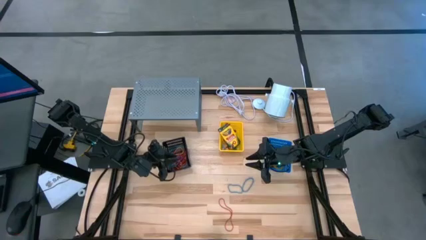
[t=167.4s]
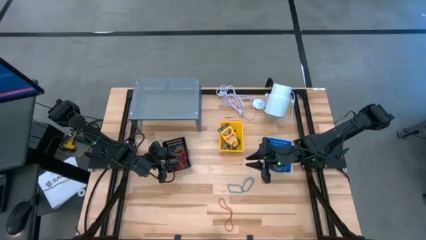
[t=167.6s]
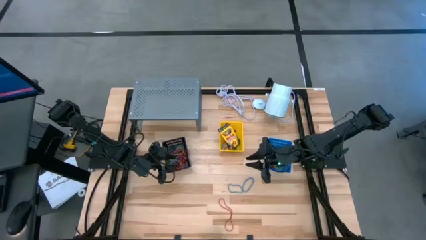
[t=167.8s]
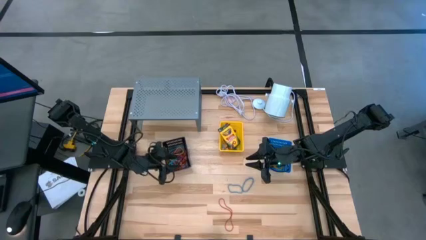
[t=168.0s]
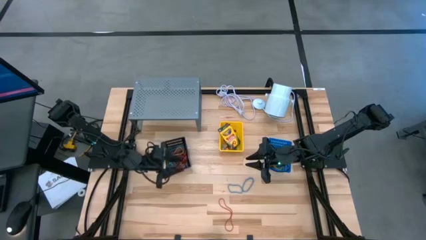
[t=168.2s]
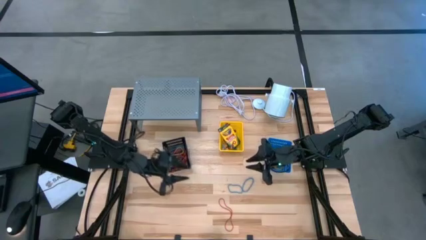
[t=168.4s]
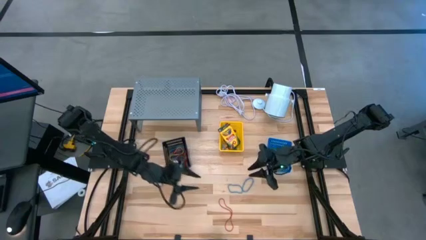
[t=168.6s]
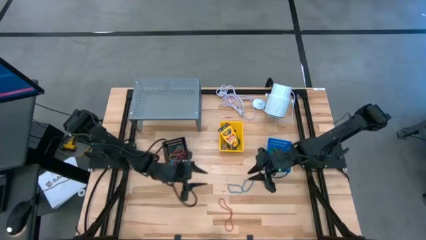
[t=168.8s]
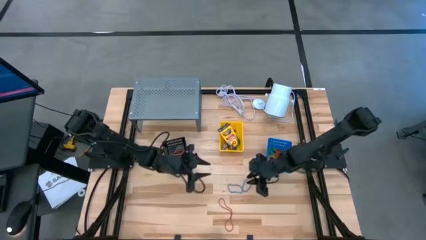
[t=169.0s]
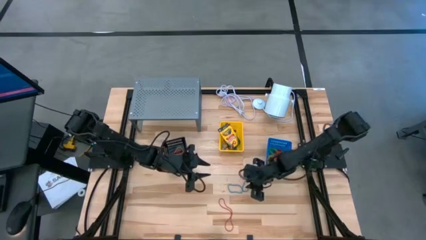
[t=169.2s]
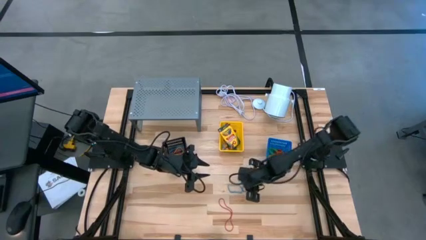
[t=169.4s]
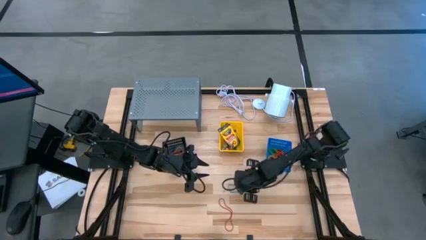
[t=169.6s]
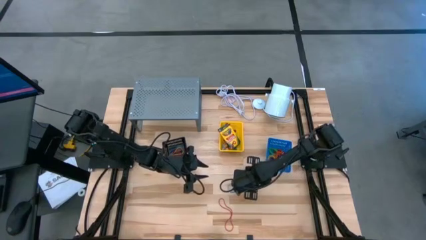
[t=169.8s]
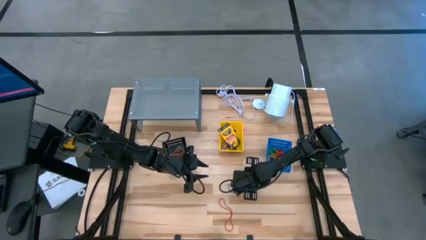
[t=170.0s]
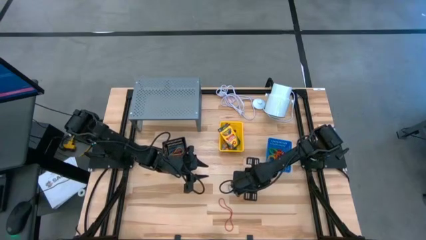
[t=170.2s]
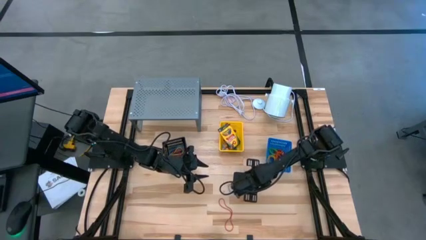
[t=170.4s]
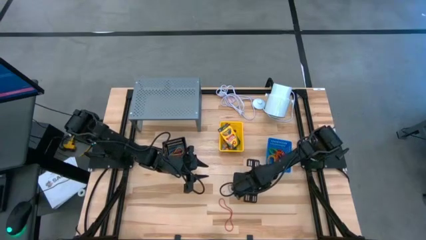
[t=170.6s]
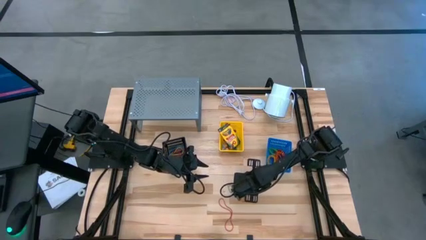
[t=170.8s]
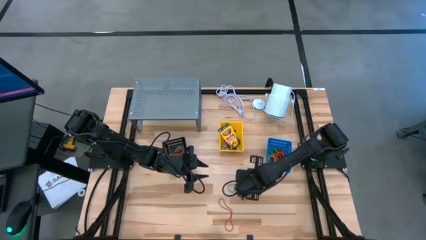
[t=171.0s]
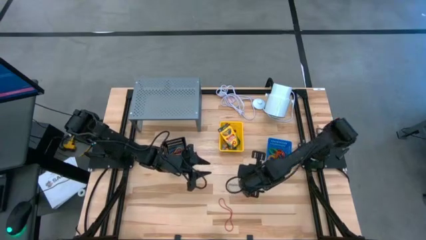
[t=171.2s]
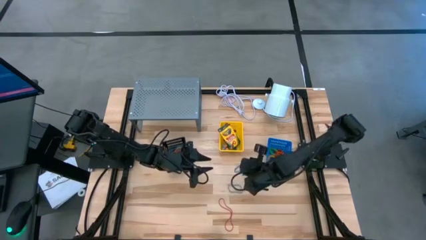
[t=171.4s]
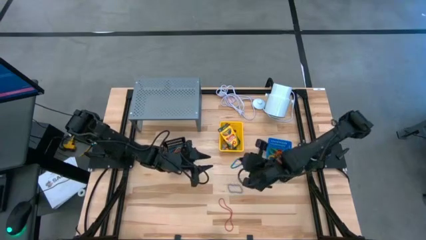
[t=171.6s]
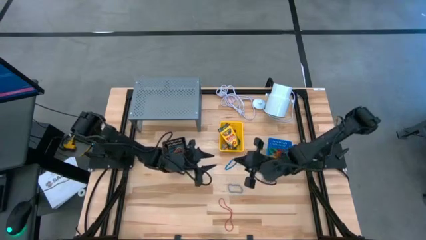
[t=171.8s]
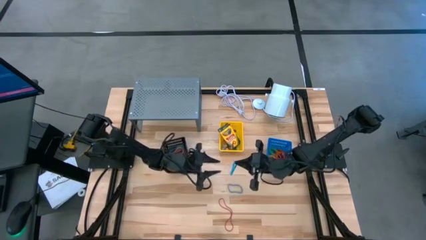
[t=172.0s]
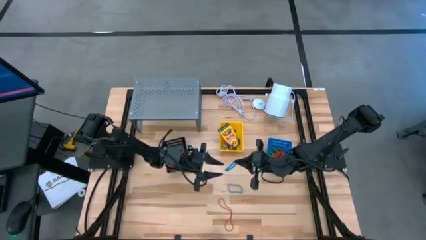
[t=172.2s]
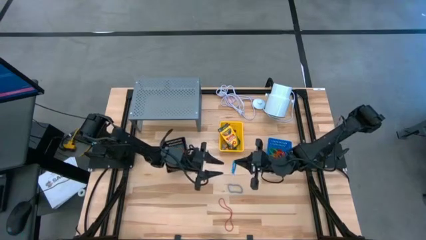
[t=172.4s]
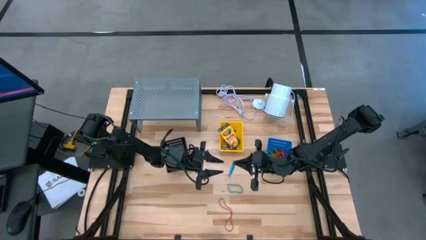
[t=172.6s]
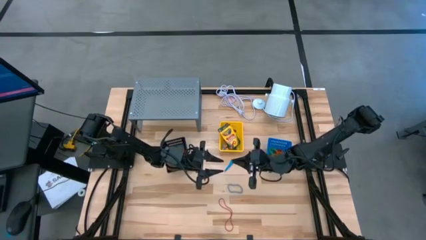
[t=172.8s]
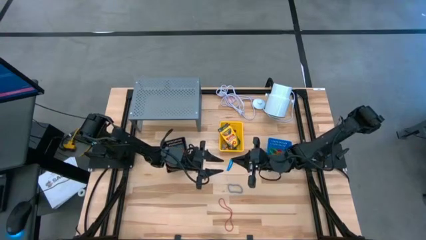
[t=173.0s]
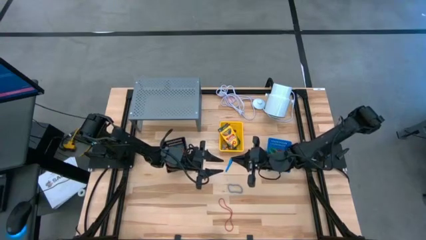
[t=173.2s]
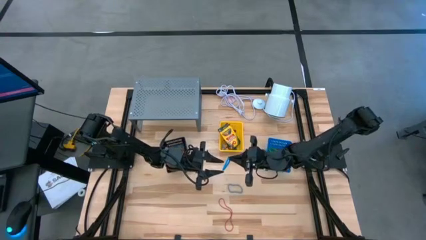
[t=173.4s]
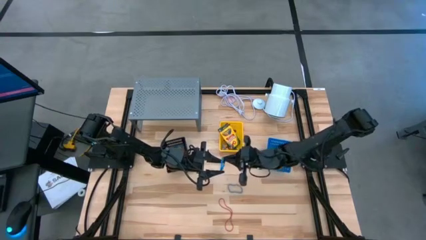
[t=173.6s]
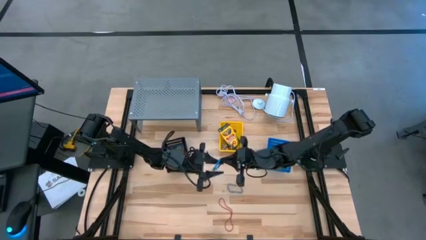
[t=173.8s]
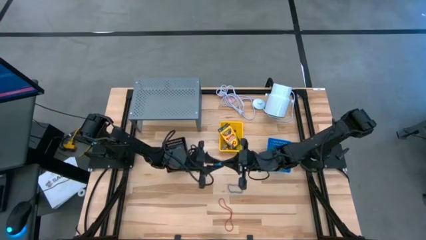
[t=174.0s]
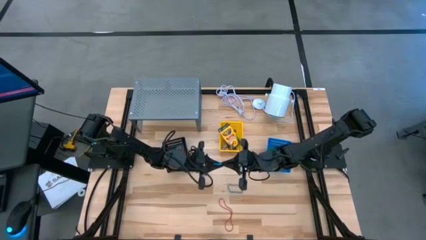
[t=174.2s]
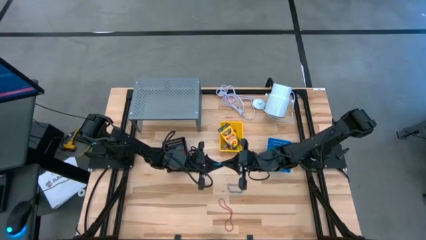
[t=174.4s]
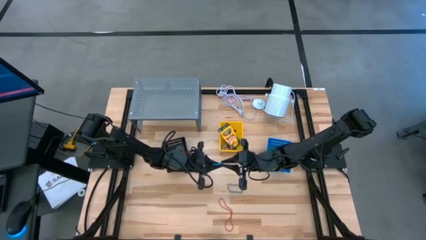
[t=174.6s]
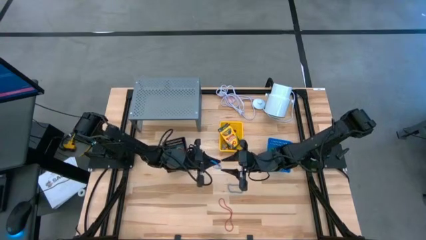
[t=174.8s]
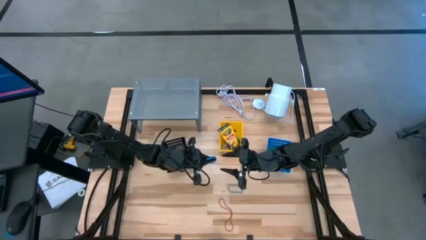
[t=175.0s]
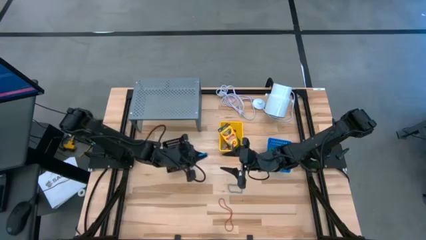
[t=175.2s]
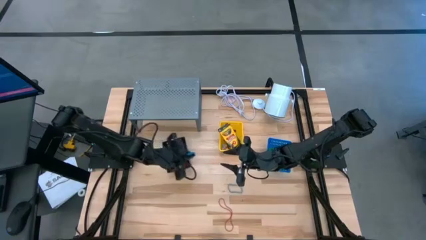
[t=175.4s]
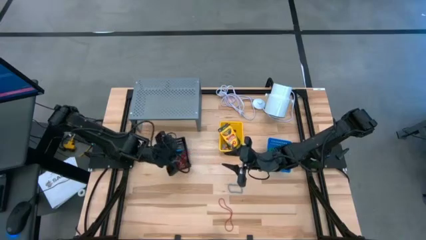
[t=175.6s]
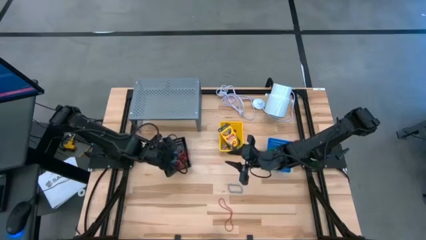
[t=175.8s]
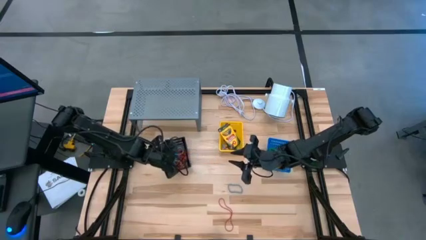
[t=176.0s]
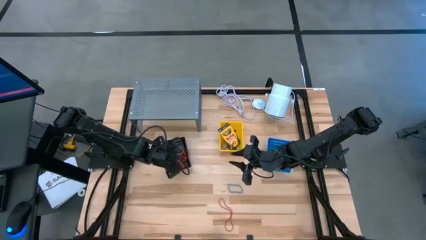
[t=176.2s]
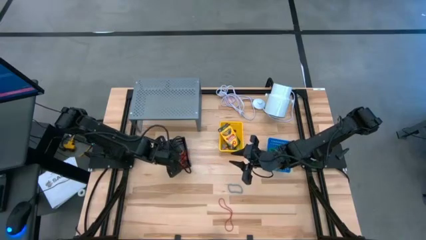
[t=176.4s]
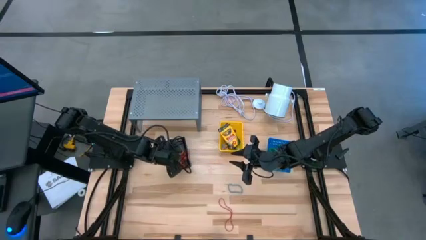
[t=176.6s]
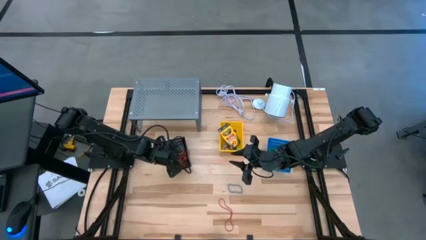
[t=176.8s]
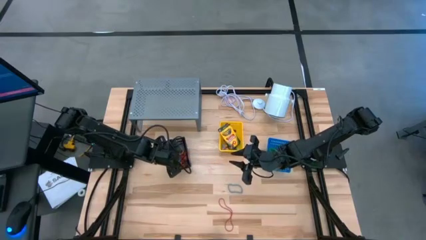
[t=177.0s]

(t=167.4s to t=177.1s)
Task: Pick & Place Office Desk Supplies
Put the blue rubber band into the black bin

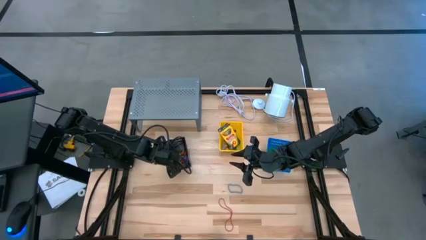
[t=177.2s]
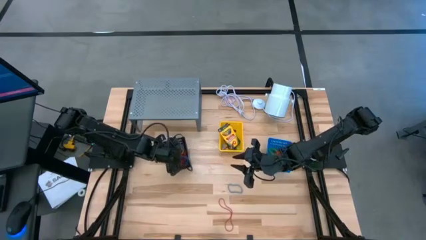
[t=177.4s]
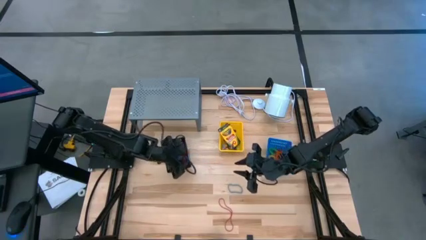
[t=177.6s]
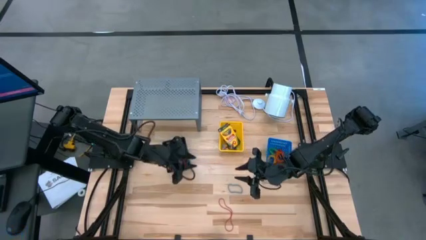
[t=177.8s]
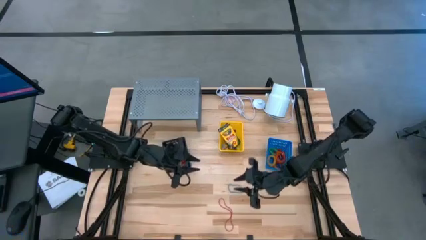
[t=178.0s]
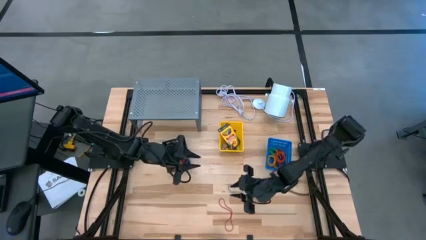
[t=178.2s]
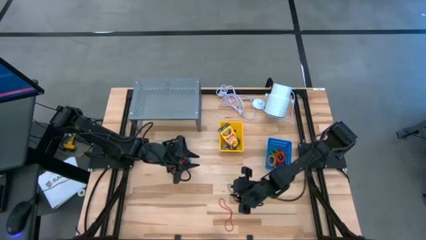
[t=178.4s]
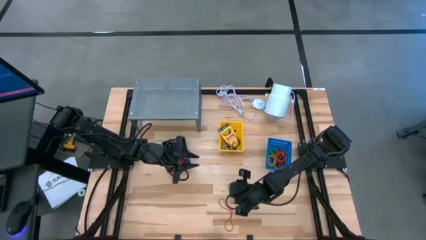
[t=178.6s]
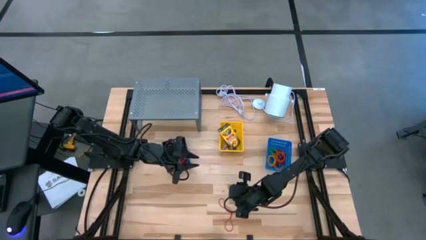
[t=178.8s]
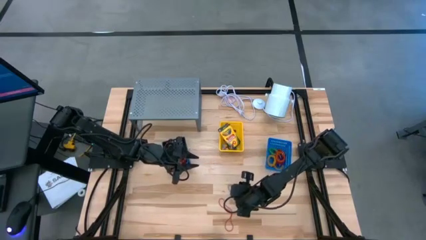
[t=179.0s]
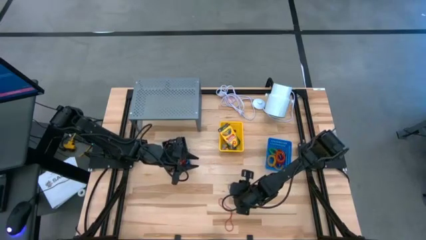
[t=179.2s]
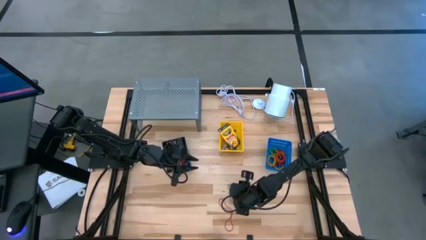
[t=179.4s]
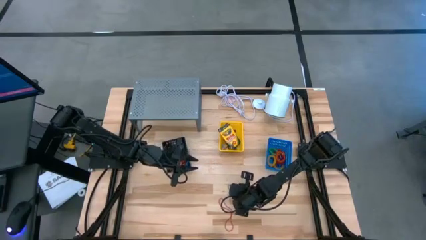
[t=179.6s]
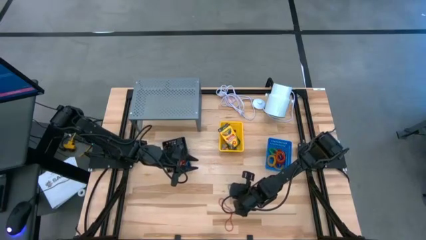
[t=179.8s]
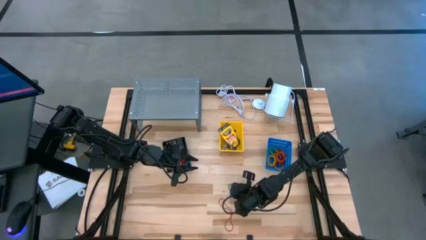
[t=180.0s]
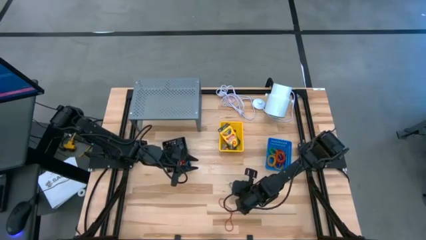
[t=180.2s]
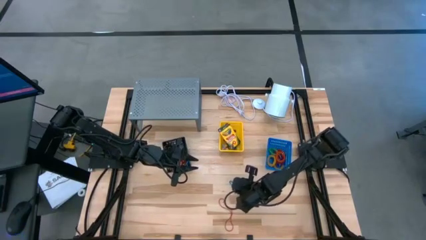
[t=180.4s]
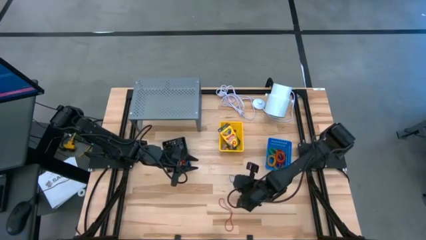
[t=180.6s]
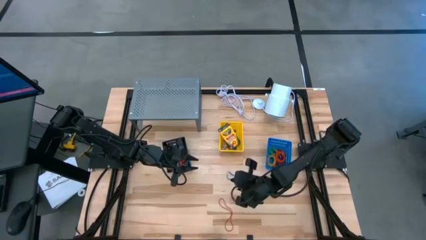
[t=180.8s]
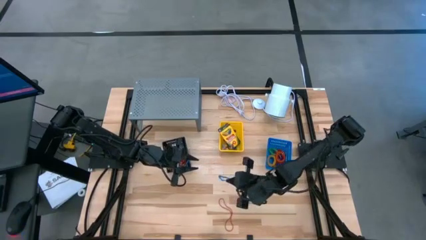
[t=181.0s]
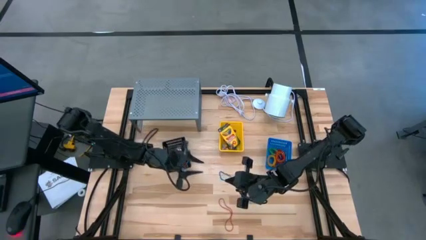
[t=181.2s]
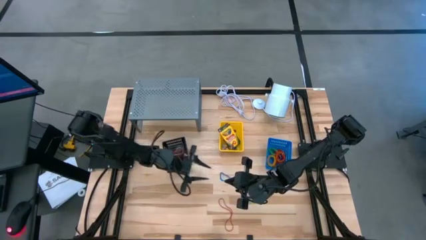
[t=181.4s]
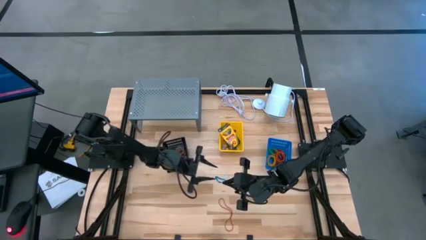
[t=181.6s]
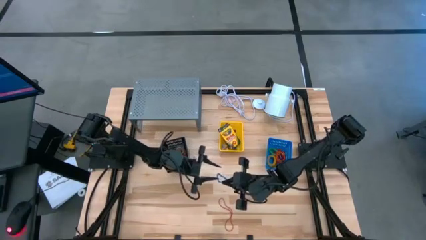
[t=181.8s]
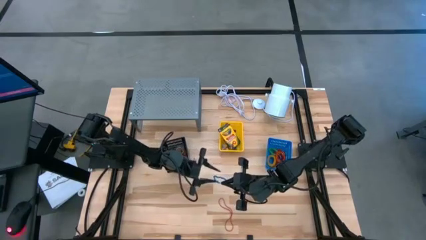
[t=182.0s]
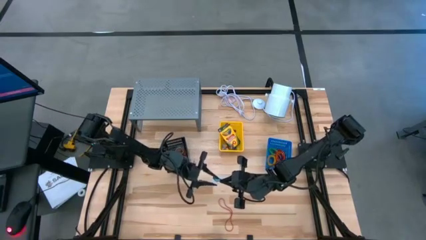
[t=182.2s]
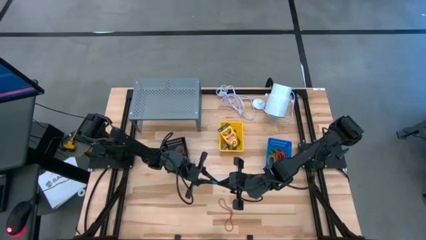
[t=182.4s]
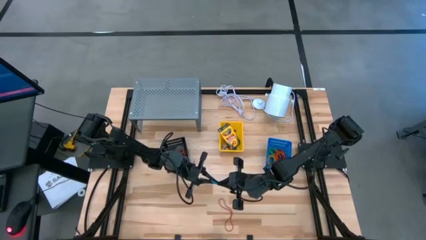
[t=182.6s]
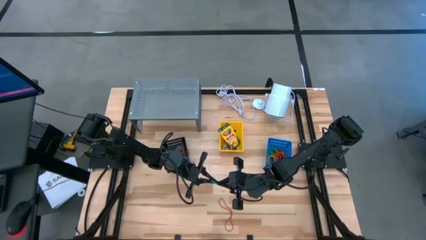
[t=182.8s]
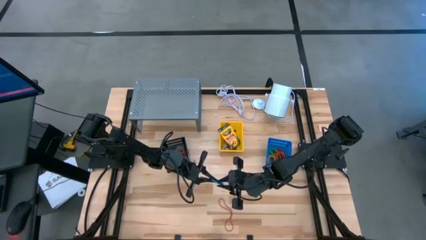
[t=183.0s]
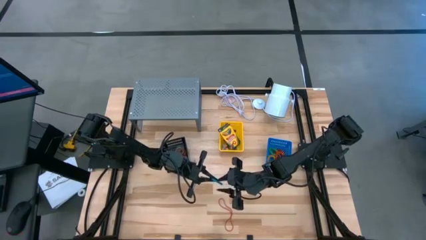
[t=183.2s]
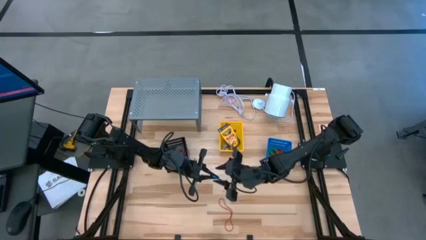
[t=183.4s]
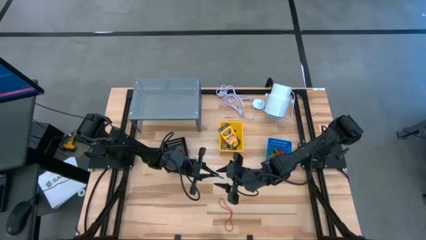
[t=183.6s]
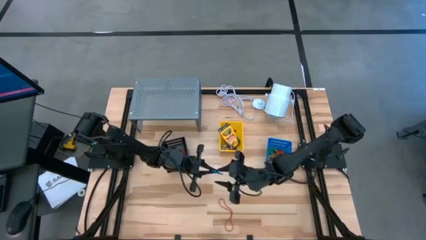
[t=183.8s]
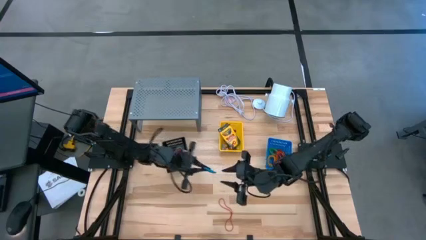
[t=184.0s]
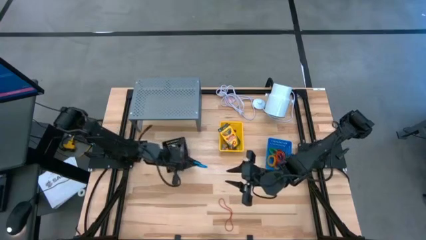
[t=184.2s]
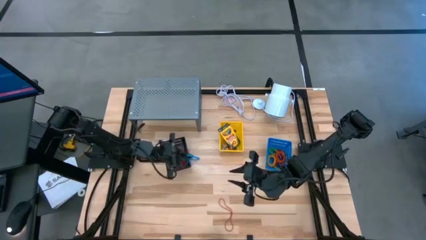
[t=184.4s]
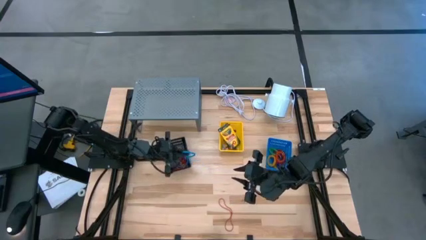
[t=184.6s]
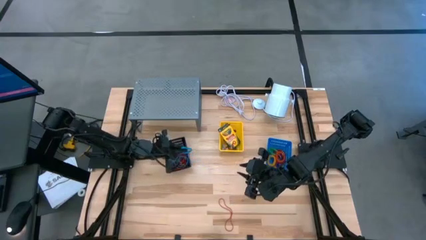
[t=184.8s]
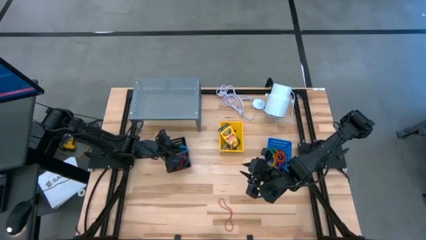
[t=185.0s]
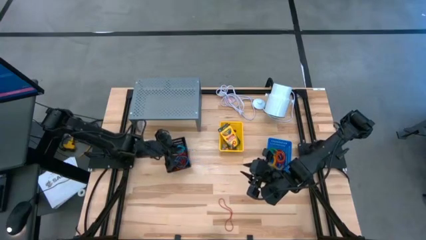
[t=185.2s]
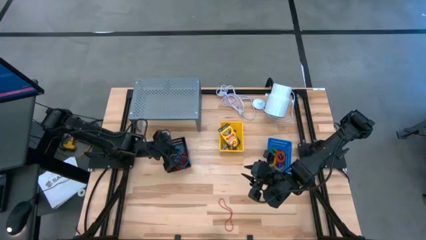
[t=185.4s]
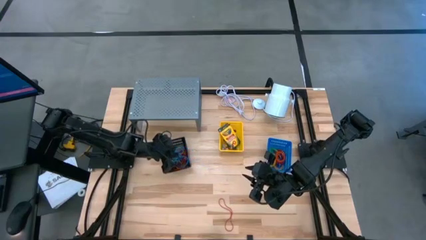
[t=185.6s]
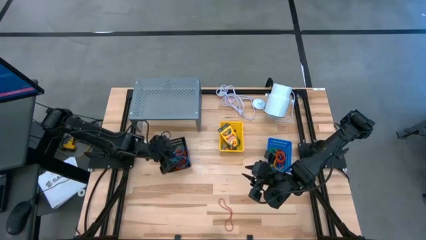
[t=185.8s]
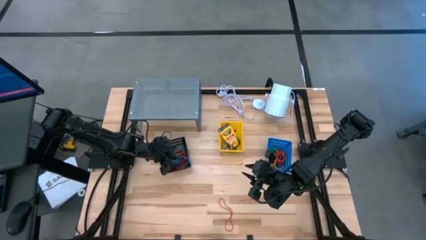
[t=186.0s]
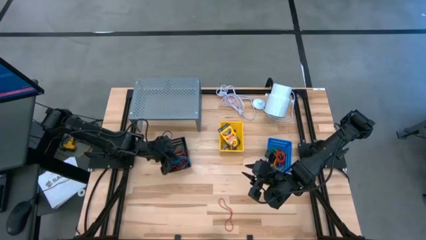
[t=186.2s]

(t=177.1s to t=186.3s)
Put the blue rubber band into the black bin
